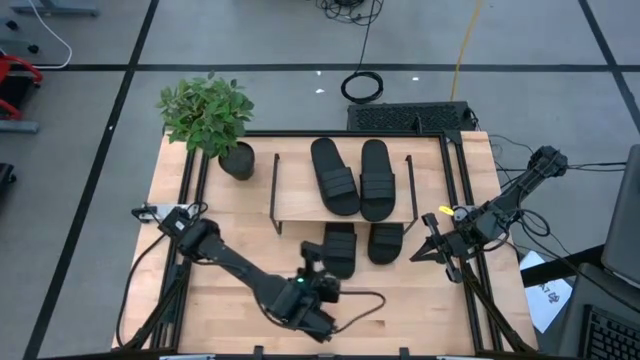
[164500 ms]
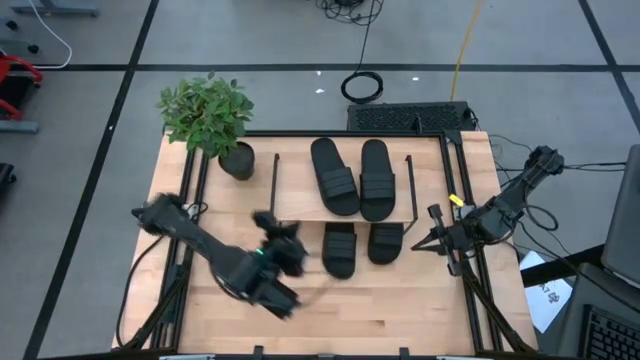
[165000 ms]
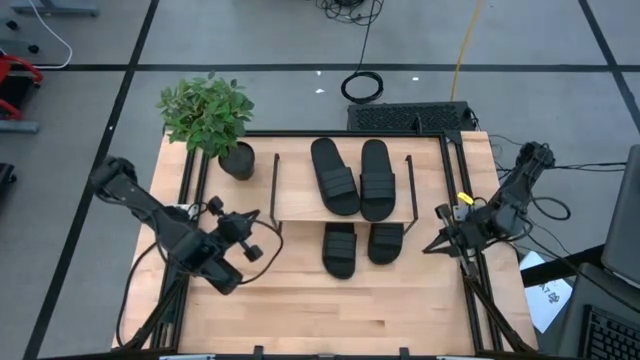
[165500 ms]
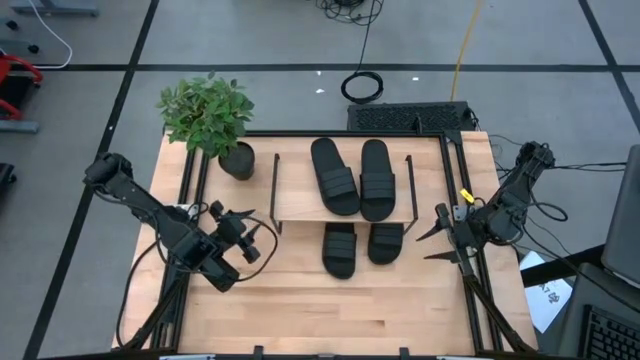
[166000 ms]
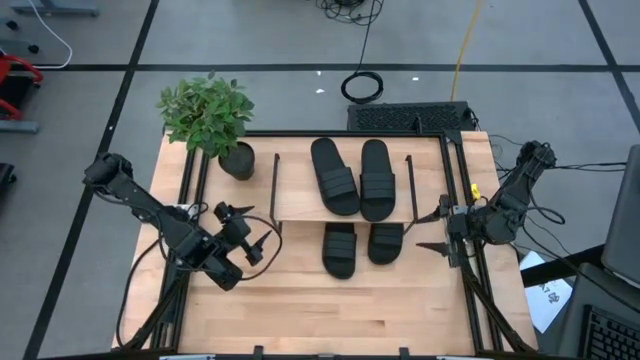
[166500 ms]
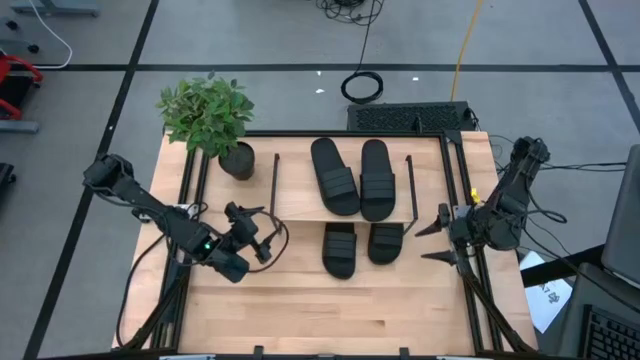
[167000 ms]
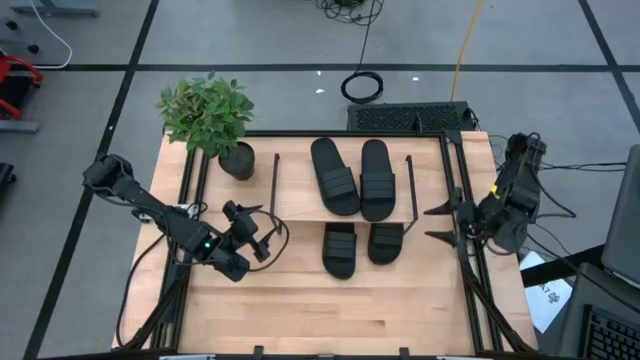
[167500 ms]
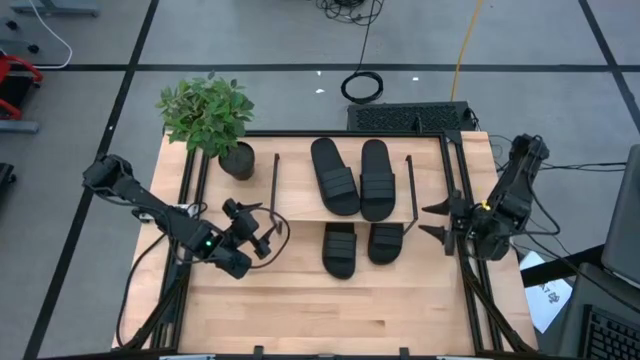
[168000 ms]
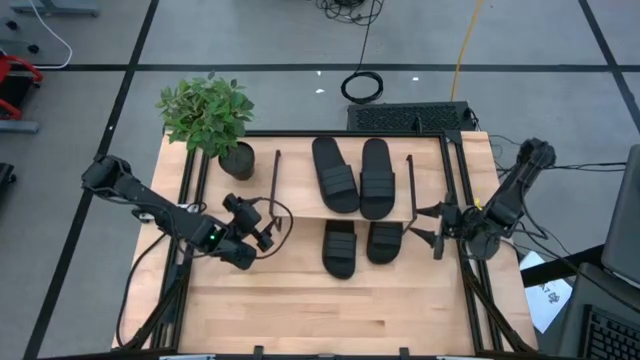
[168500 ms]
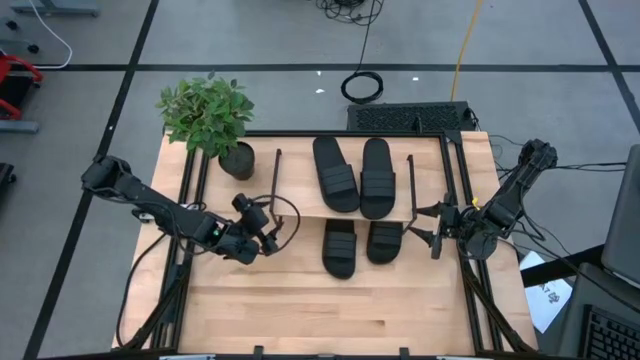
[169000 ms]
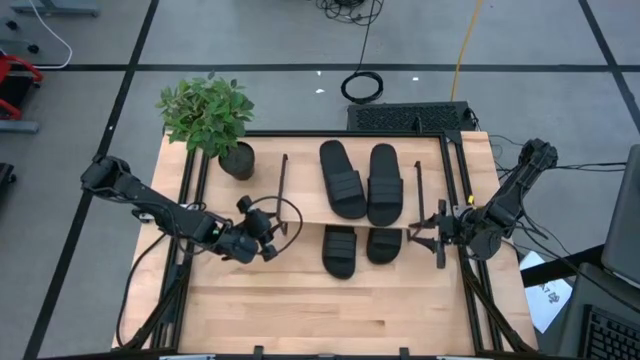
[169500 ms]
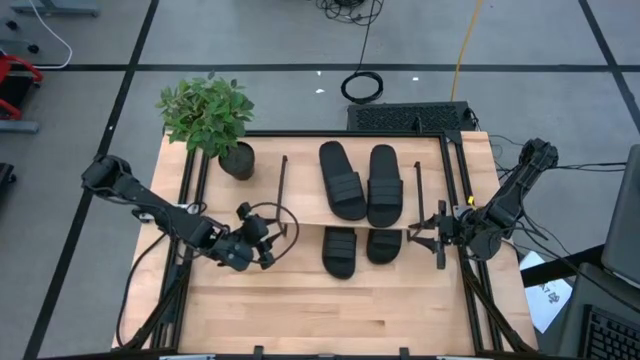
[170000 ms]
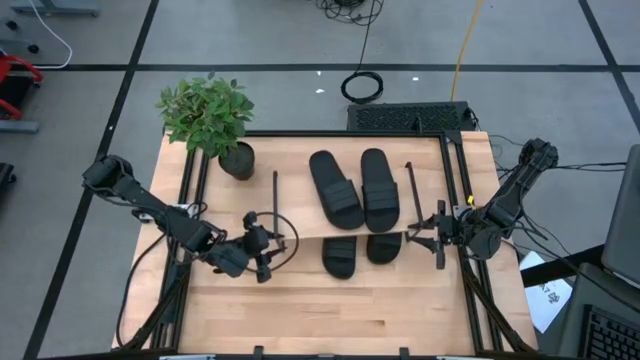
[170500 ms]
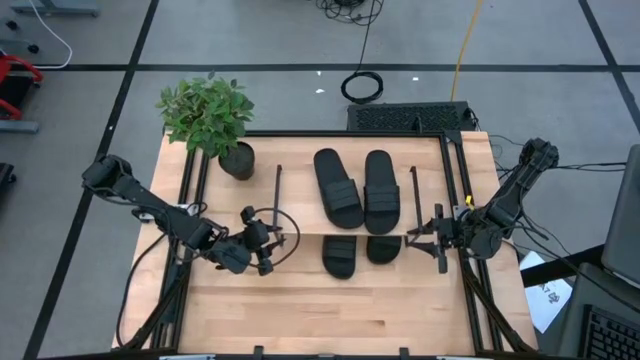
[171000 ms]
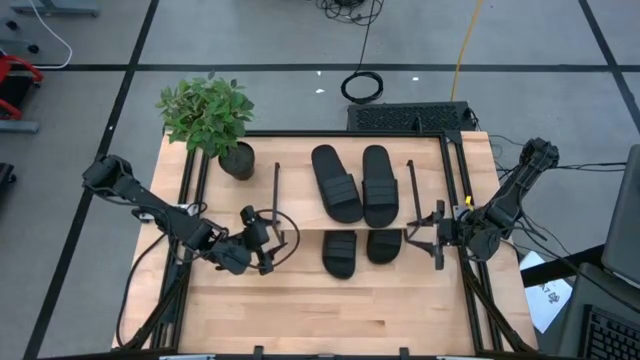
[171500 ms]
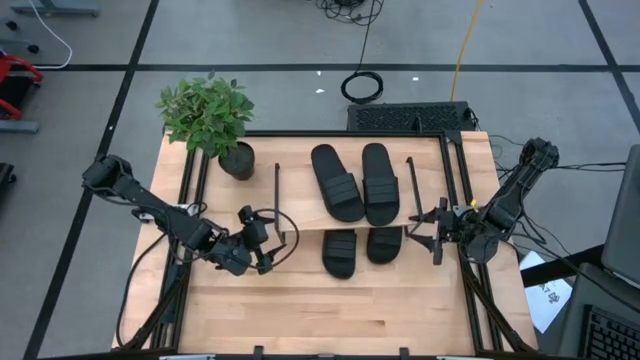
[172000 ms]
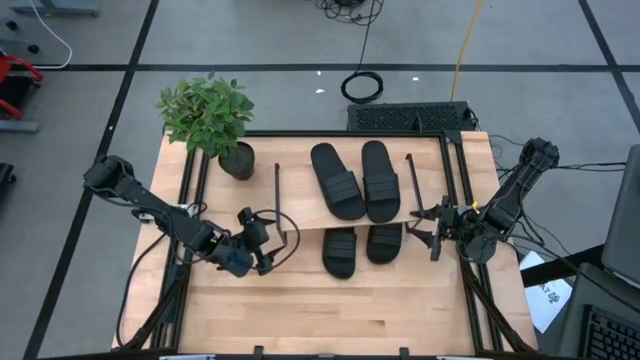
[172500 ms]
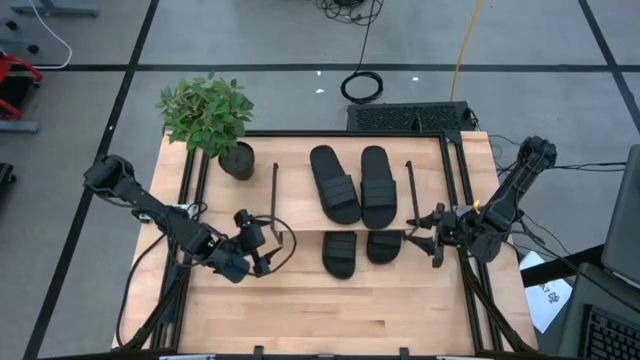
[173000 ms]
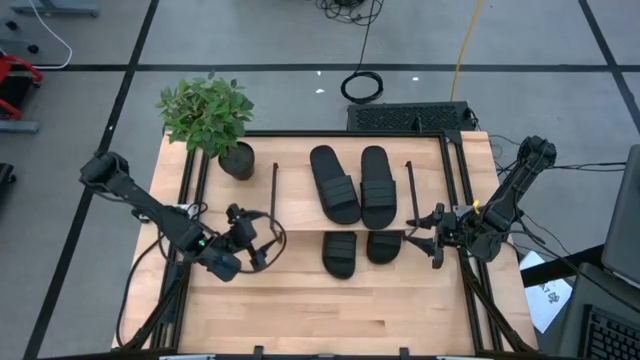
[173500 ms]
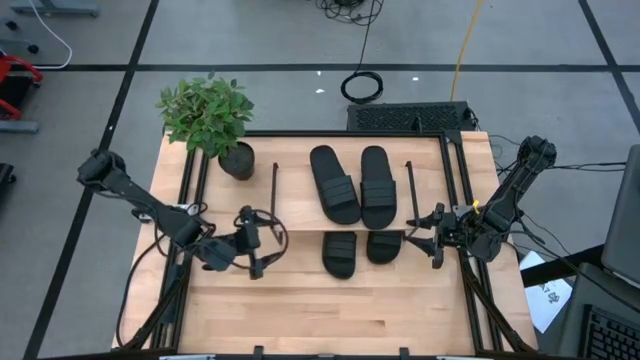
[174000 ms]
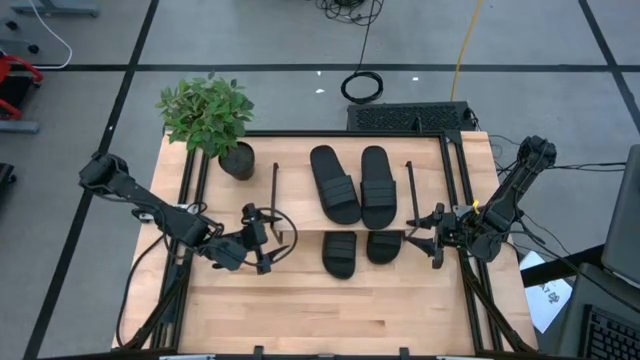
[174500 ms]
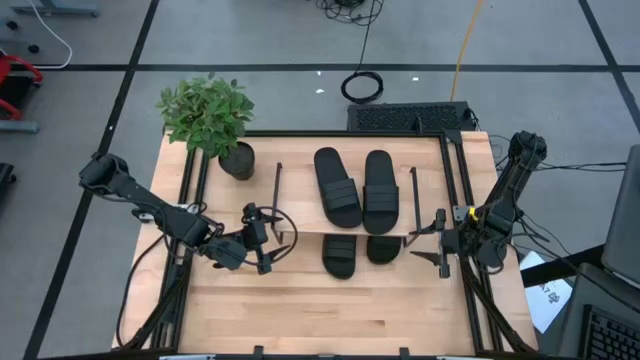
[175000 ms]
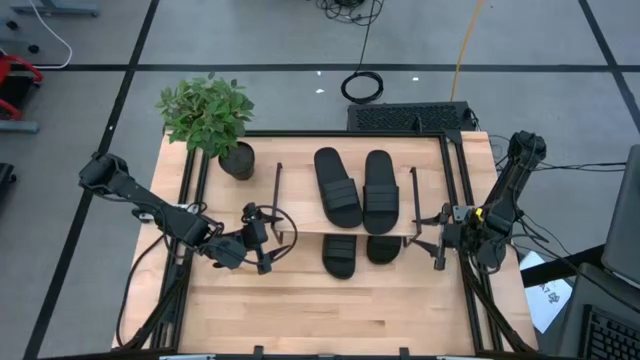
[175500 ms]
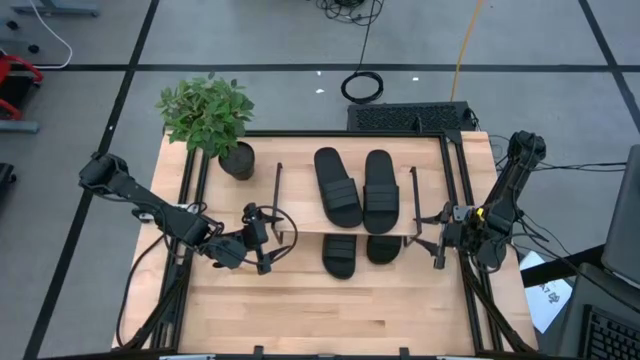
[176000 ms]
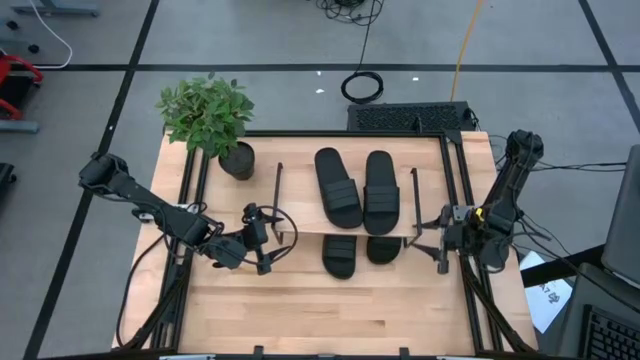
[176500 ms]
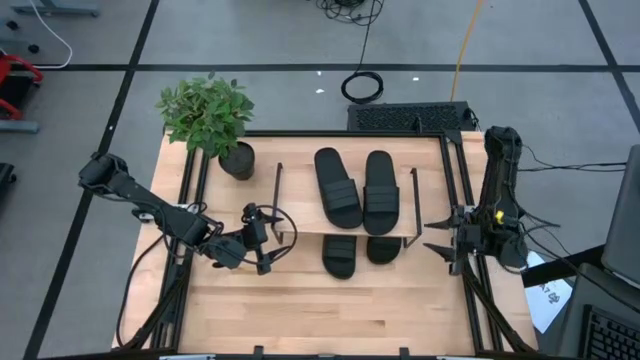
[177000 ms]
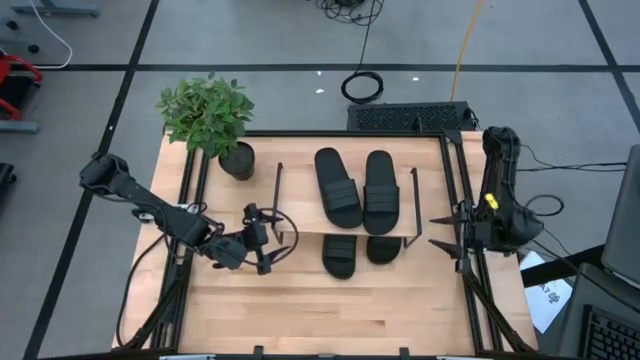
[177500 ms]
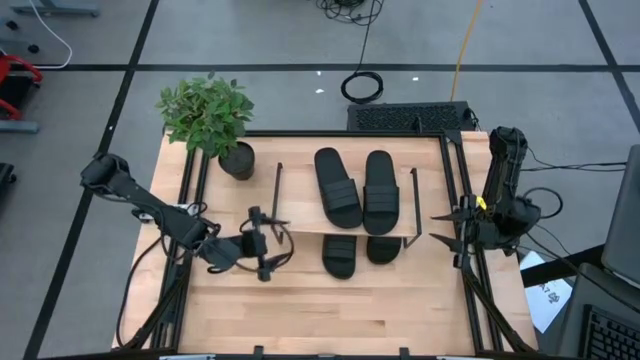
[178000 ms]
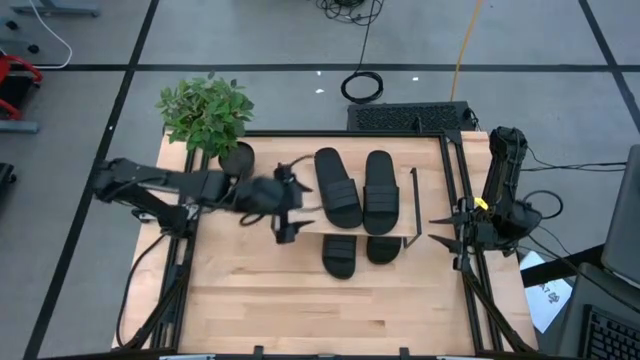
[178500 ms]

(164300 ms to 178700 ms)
Task: Pick and place slides into the shelf
Adjust the shelf

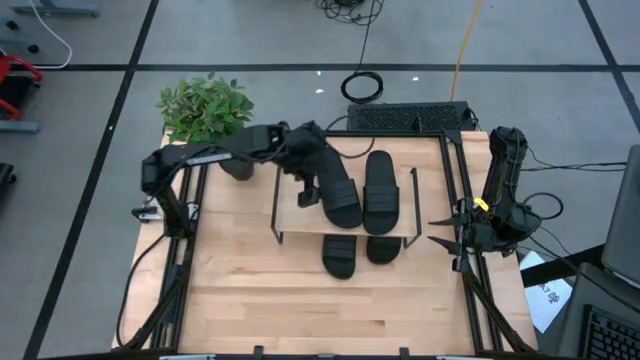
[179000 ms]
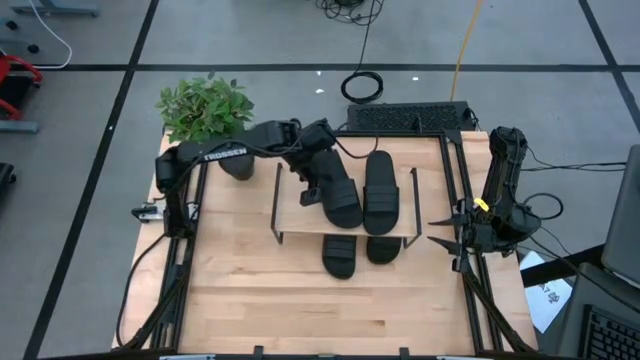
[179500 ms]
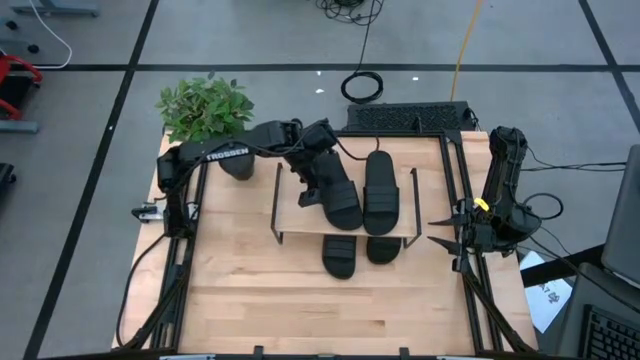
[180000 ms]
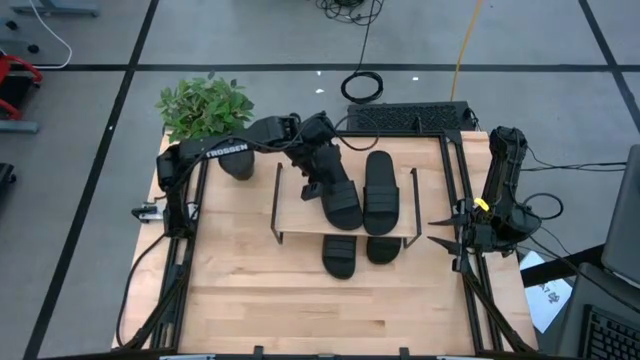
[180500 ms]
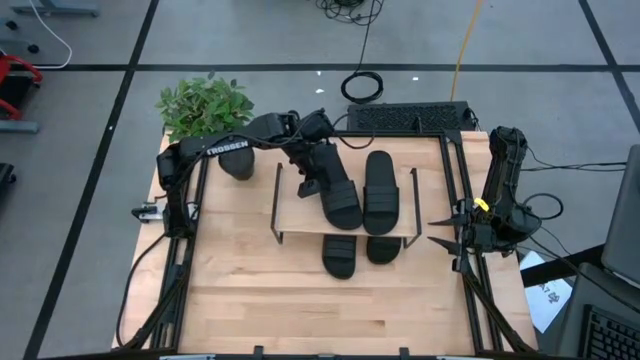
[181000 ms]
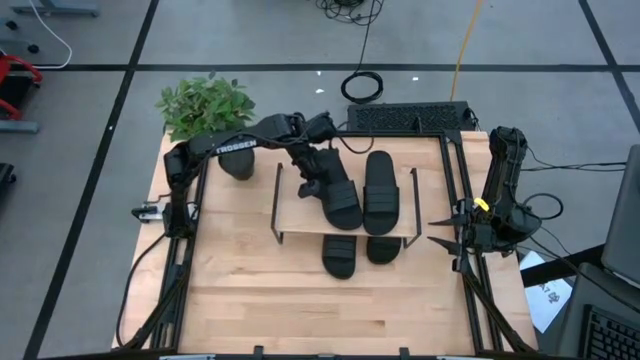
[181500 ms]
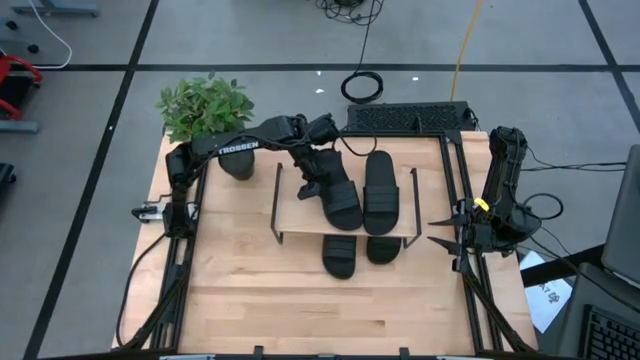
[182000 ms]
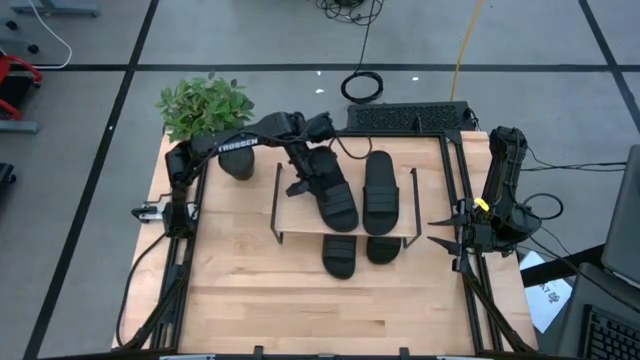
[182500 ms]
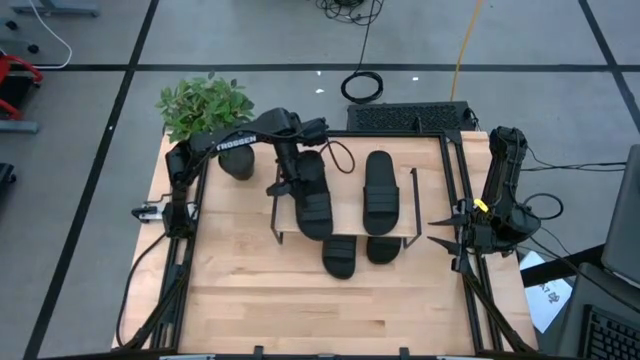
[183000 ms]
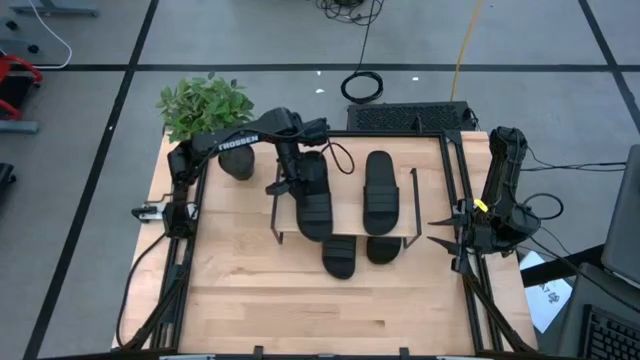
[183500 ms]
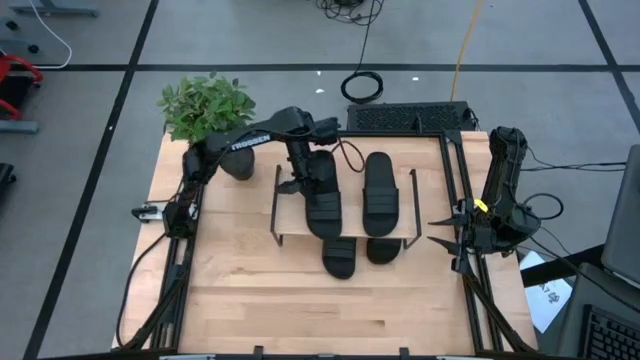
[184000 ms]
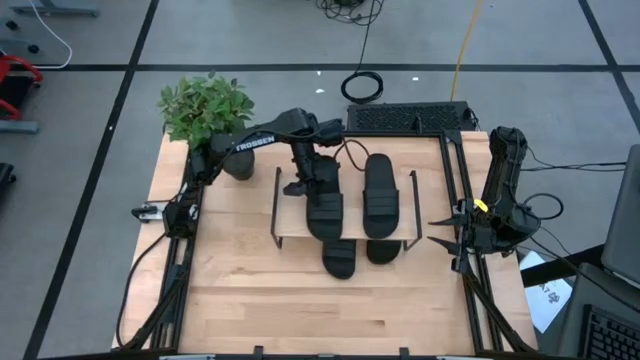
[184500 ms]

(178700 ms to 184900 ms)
Adjust the black slide on the shelf
